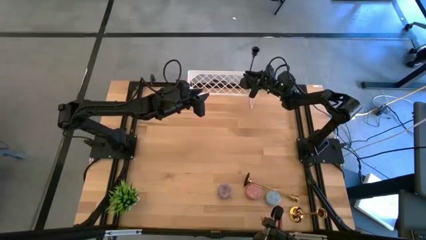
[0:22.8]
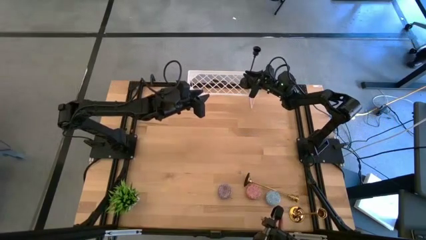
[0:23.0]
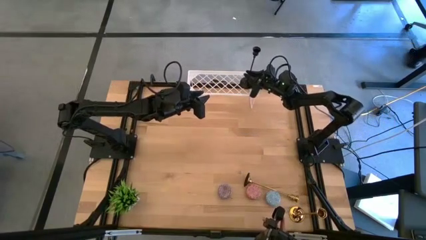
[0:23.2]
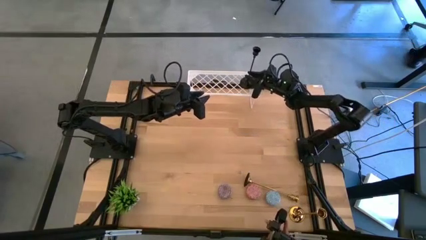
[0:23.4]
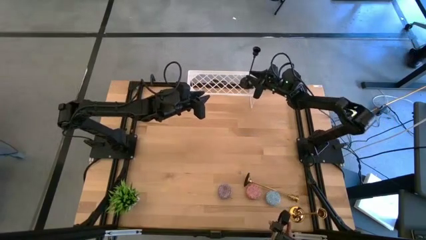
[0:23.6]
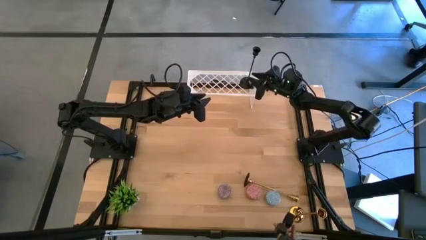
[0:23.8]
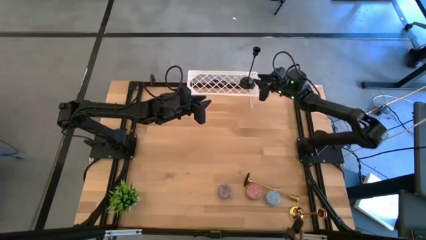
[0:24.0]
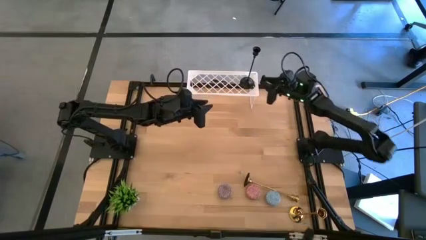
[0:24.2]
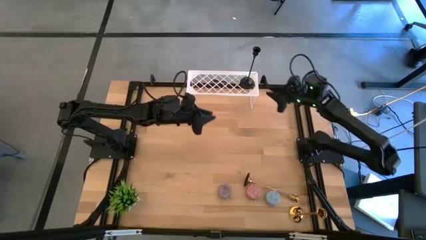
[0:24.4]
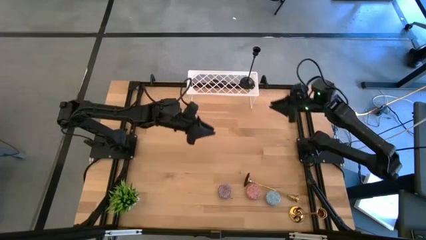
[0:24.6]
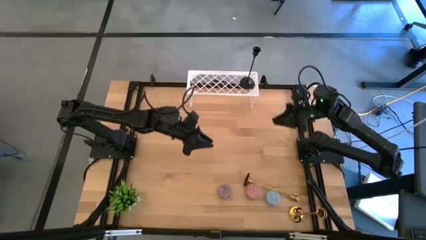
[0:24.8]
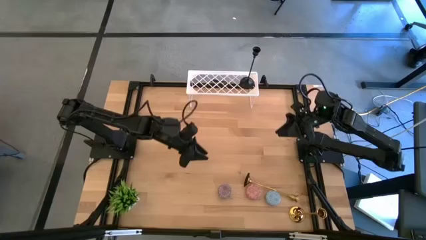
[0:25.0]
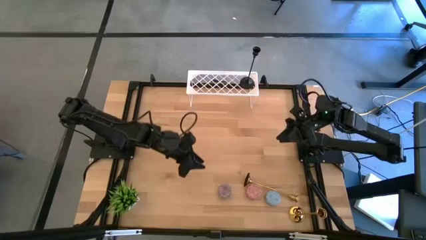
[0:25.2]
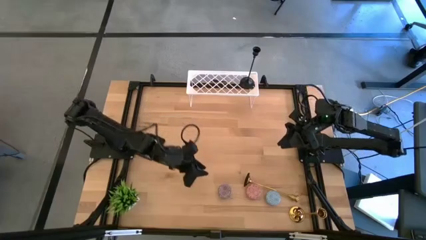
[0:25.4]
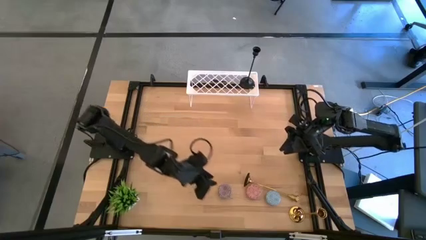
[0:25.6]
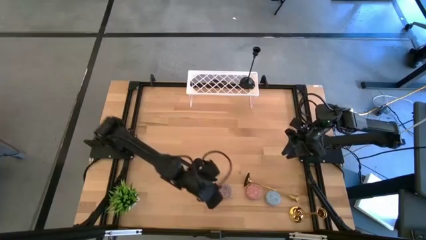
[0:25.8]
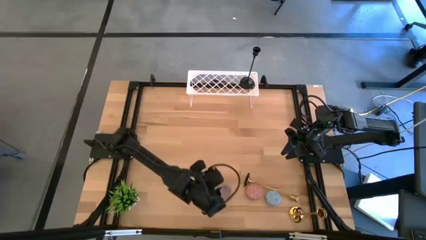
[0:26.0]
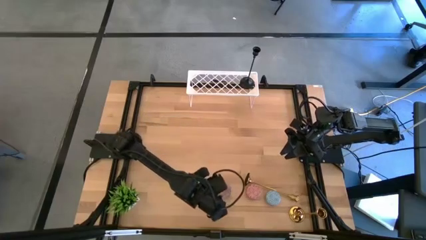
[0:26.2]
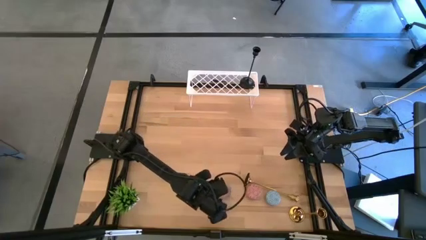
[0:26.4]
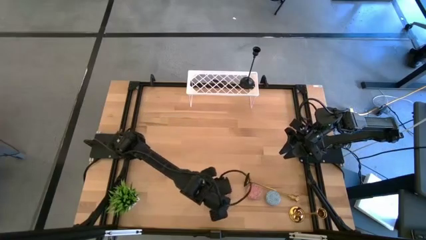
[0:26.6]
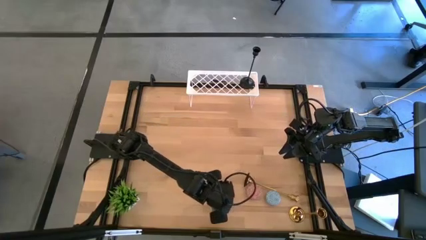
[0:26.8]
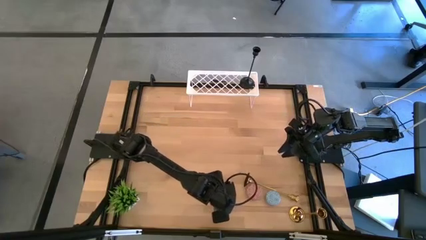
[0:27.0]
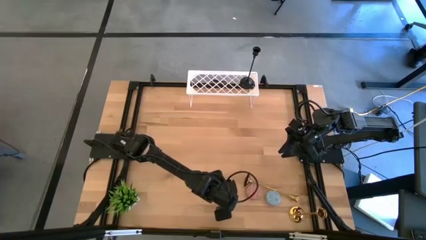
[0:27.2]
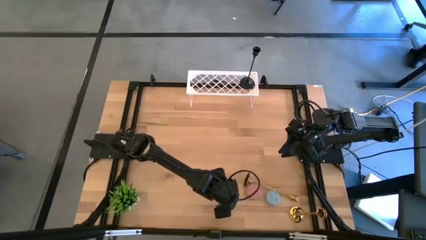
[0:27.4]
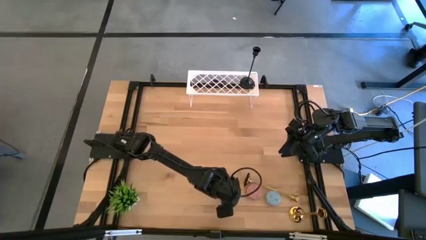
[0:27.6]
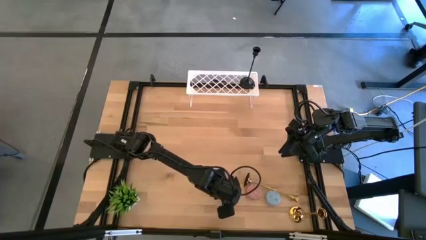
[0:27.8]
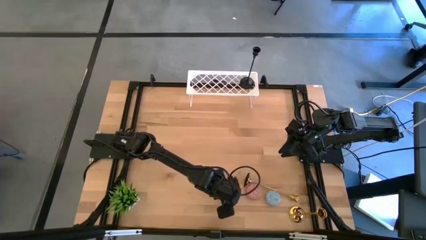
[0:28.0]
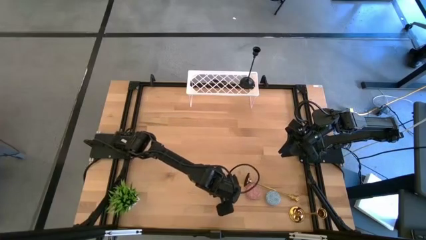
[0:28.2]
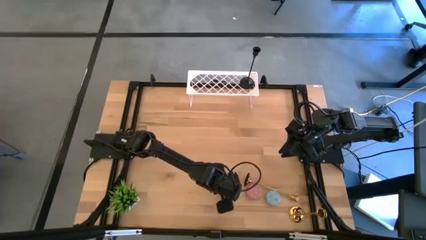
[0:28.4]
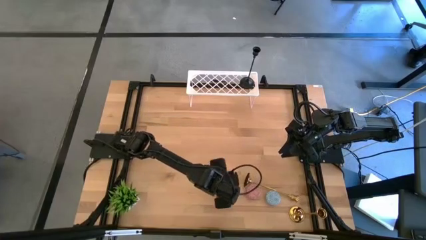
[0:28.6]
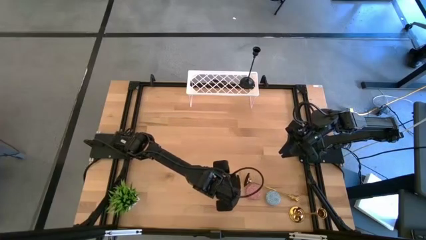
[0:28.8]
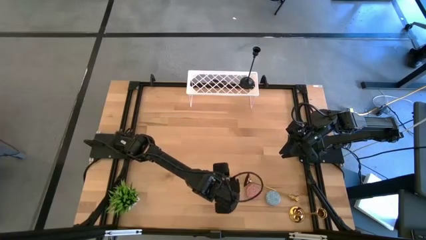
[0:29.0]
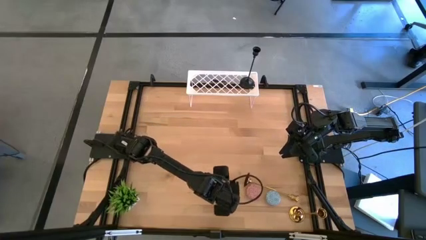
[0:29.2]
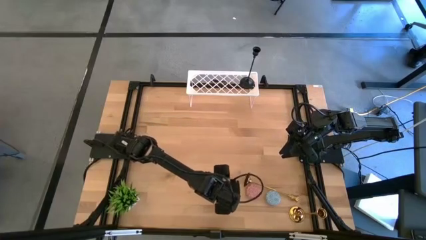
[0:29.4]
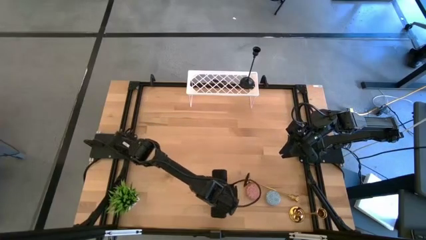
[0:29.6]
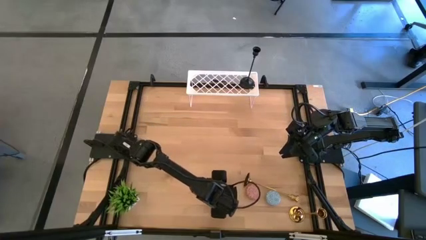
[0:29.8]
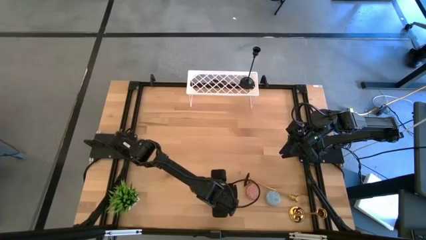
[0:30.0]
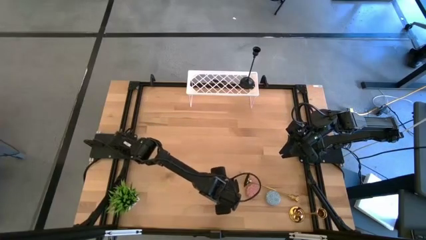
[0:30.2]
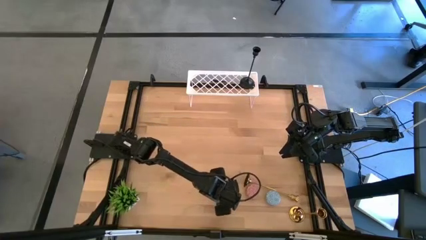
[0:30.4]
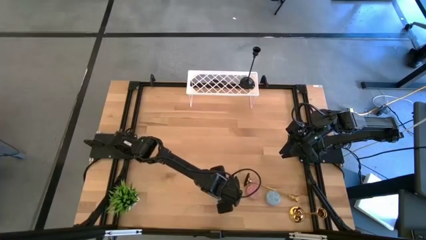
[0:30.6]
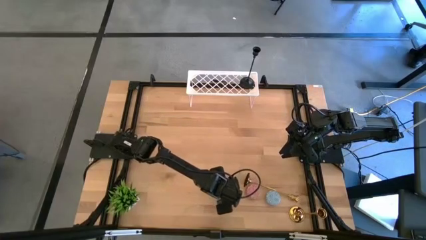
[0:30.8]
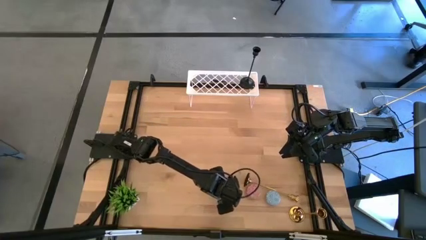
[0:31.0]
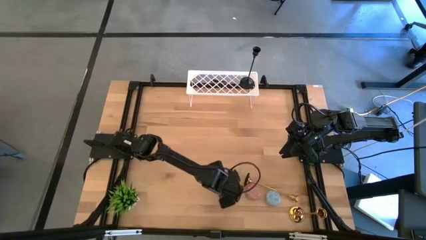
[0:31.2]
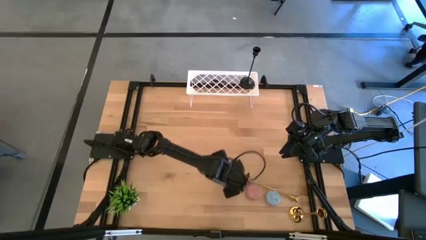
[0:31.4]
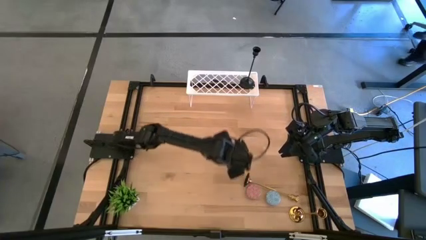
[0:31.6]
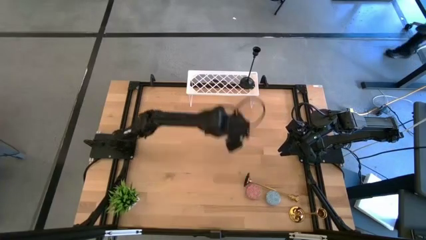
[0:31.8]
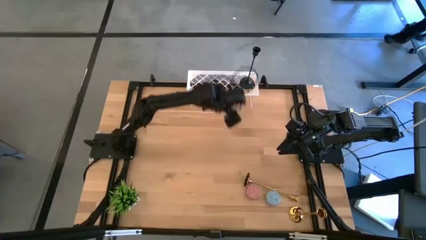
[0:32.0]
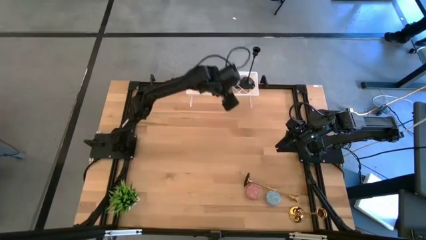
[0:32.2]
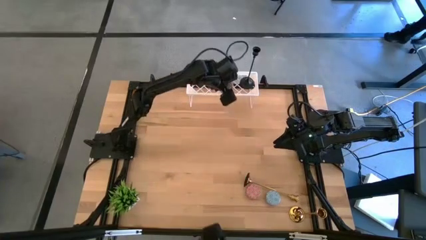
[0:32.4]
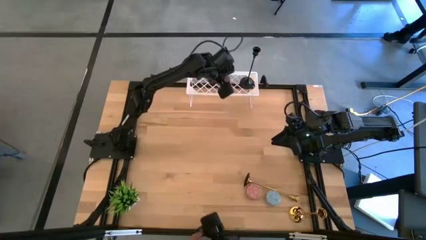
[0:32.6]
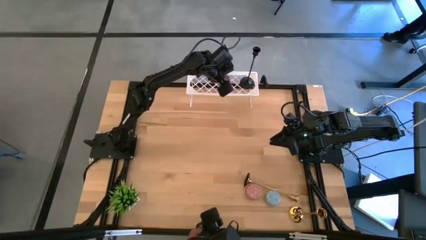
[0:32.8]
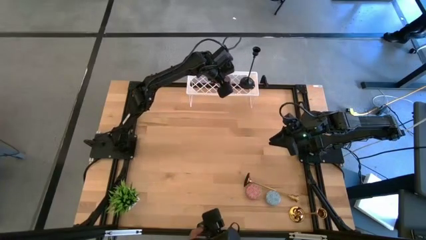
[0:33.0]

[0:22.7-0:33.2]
Task: Pick & Place candle stick holders
Put the red scented candle on the shelf
